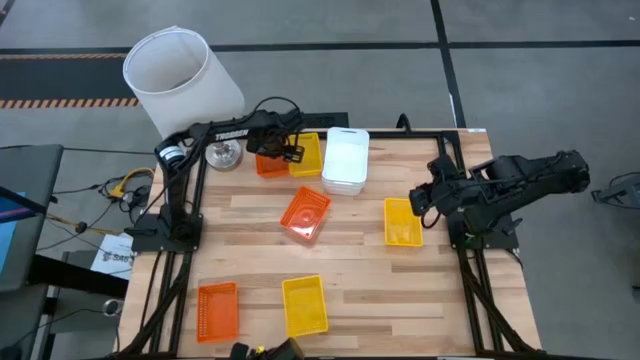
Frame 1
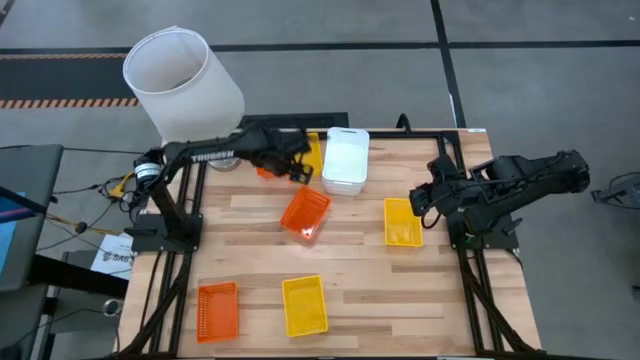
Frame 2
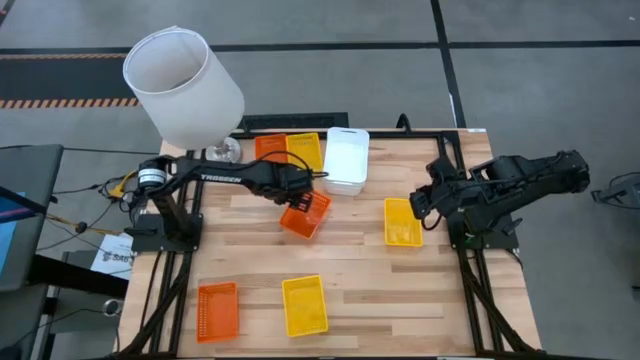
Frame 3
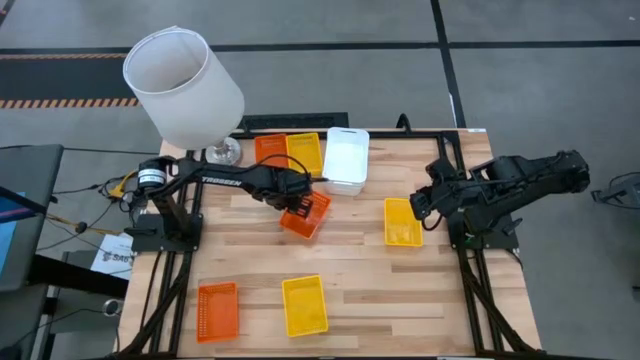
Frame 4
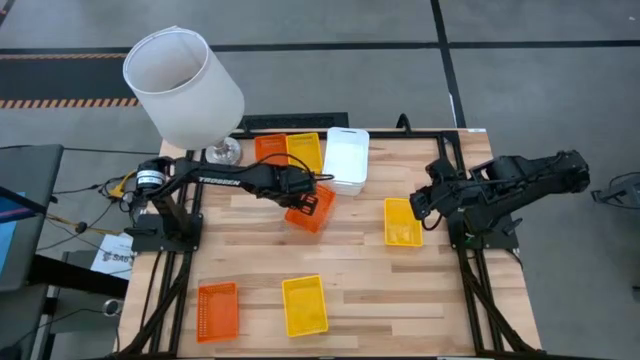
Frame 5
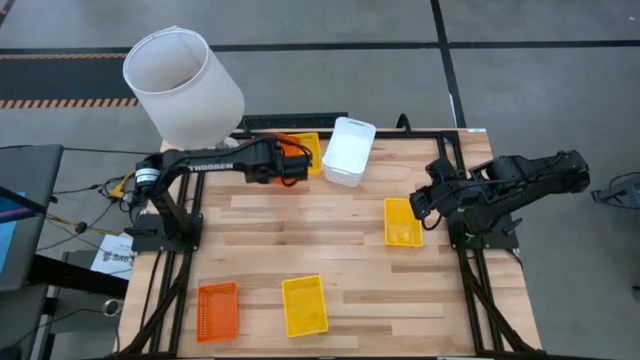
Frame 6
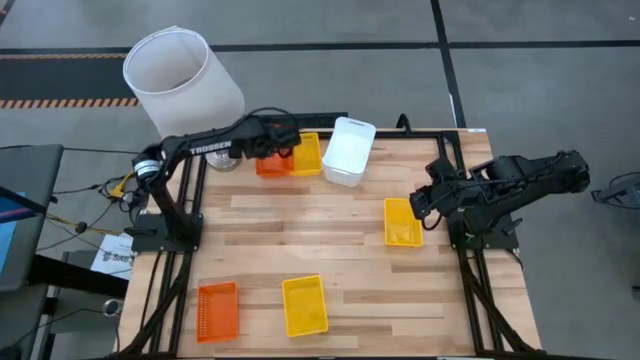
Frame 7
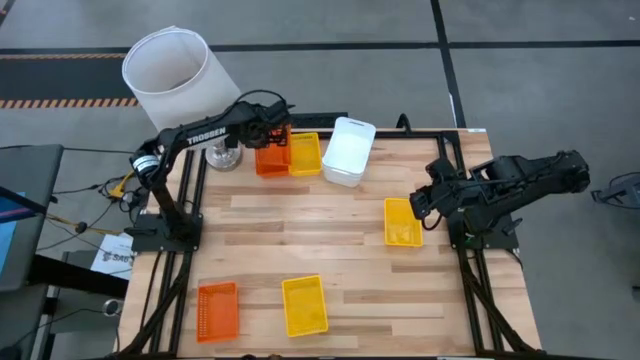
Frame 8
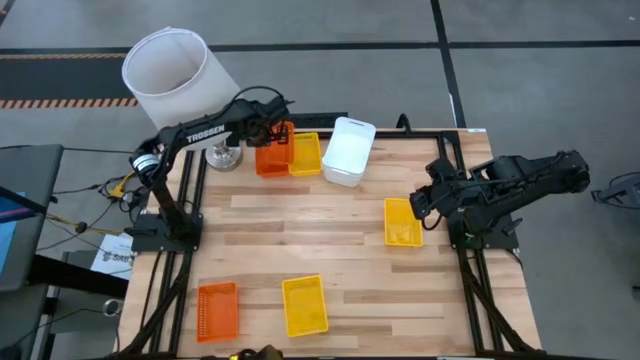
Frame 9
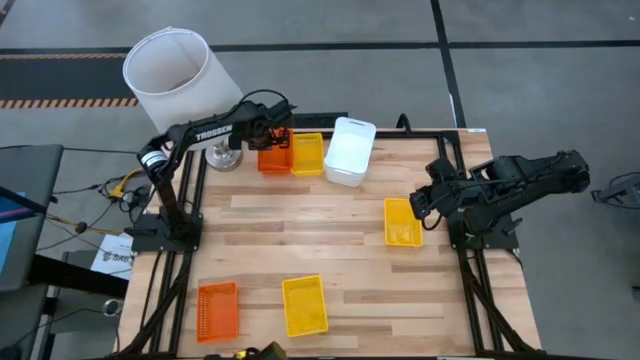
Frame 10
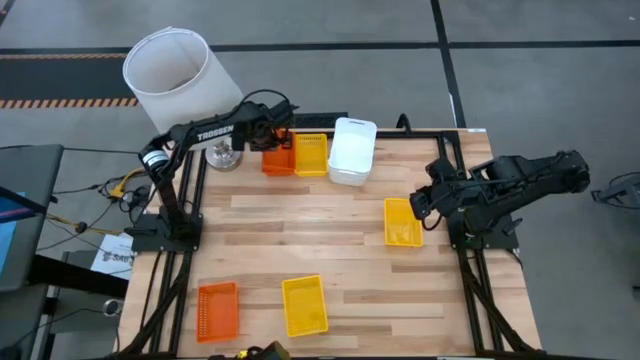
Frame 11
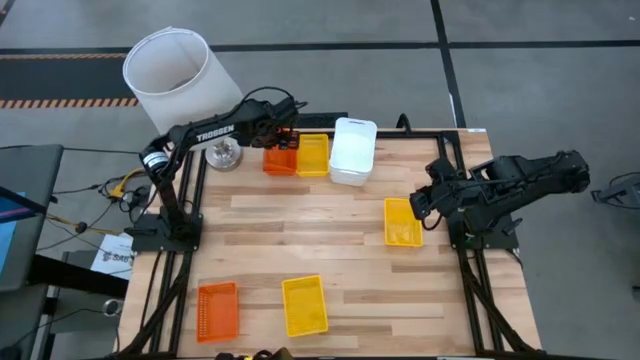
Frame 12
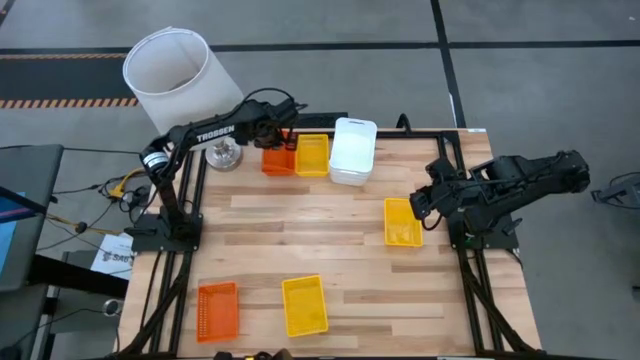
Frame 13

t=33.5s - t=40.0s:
Stack the middle orange bin on top of the top orange bin

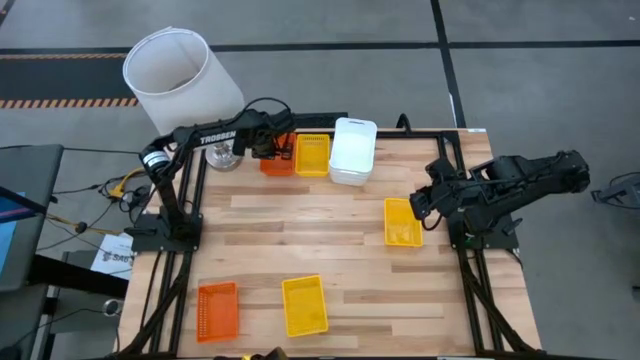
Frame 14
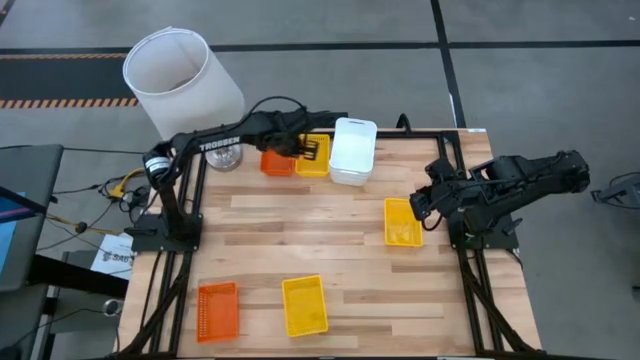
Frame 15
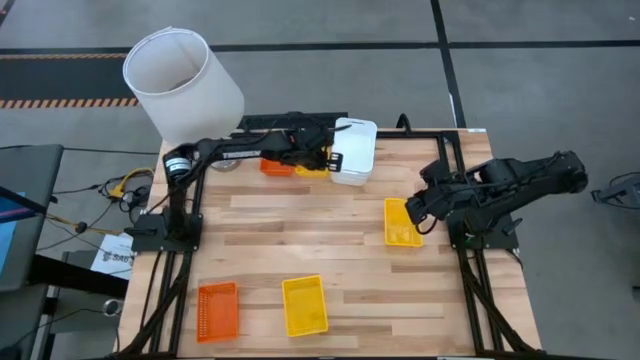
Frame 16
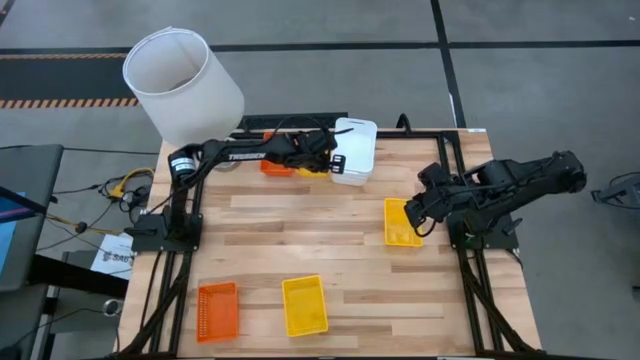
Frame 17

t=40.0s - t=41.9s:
Adjust the stacked white bins on the table

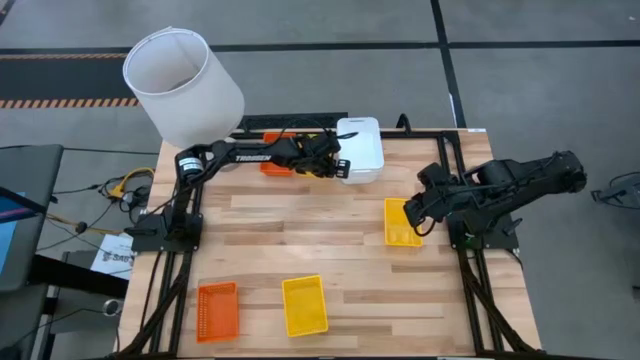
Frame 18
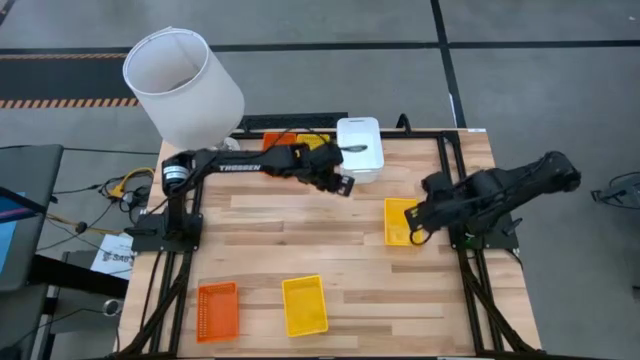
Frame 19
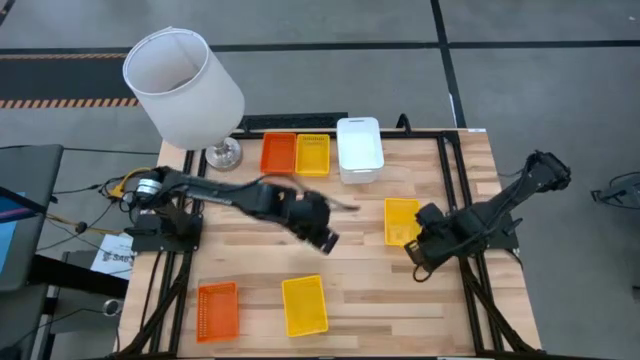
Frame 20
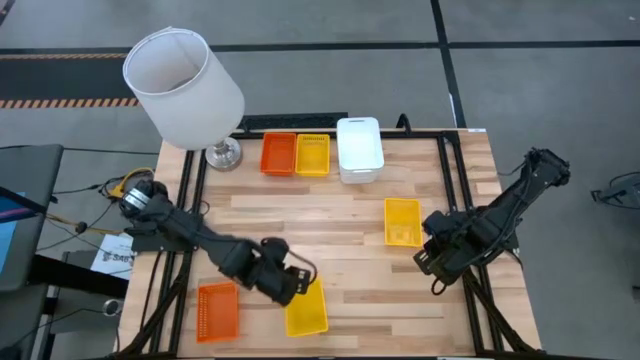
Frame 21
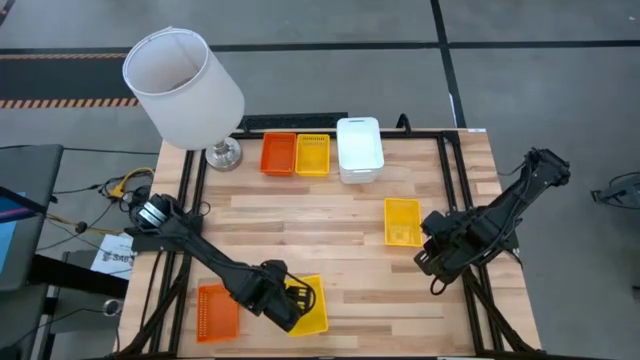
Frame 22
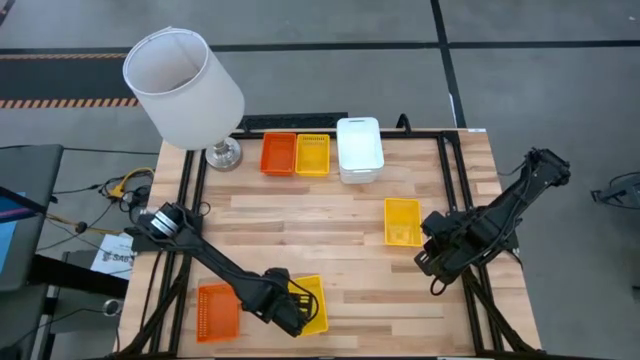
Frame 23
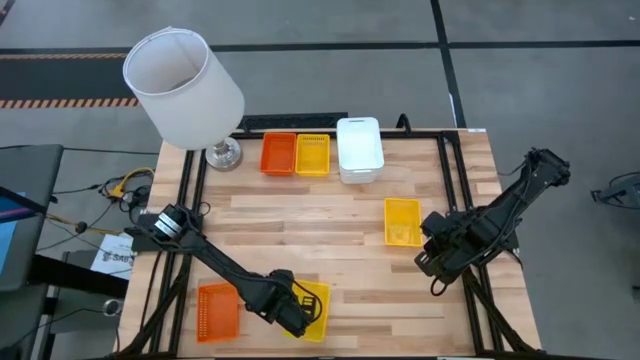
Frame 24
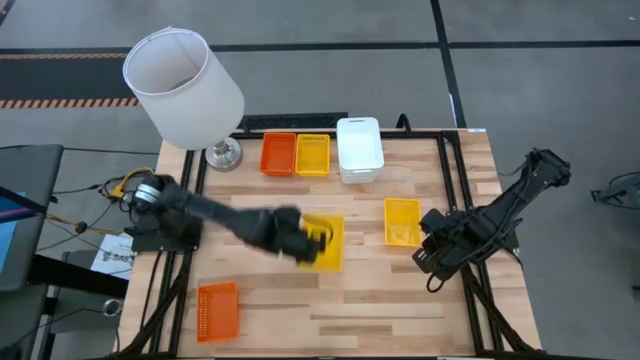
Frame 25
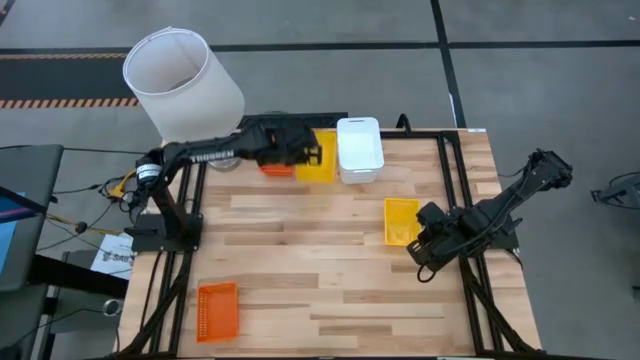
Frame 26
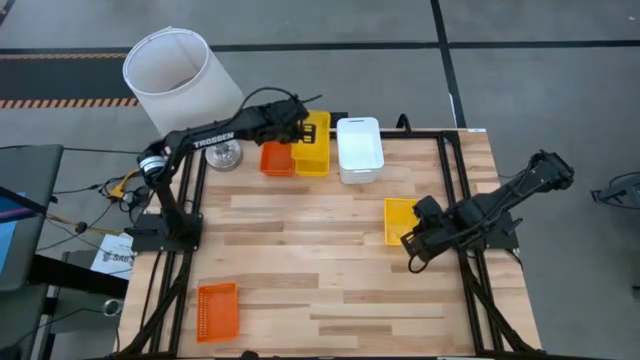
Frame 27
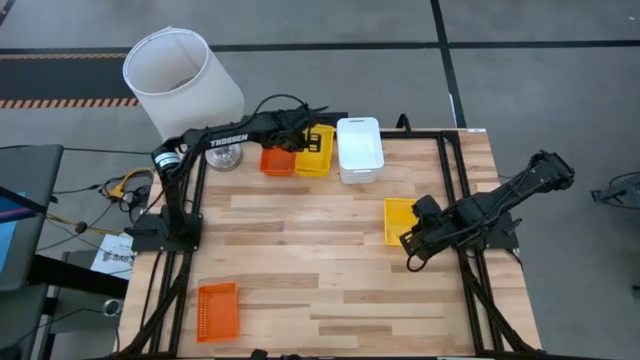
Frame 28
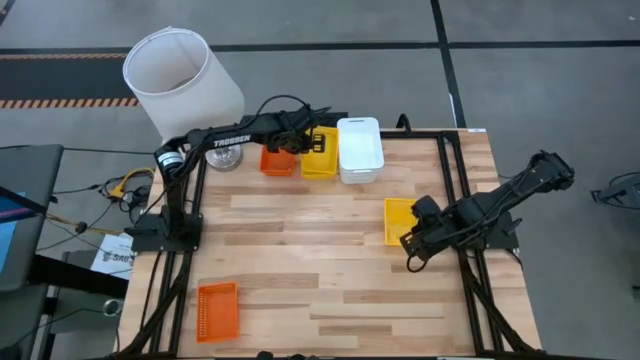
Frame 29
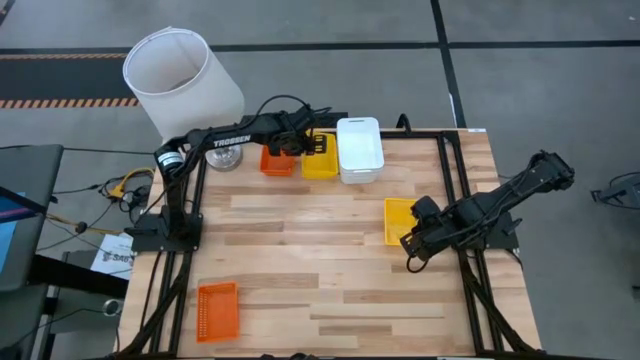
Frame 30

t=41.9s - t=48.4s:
Stack the bottom yellow bin on top of the top yellow bin

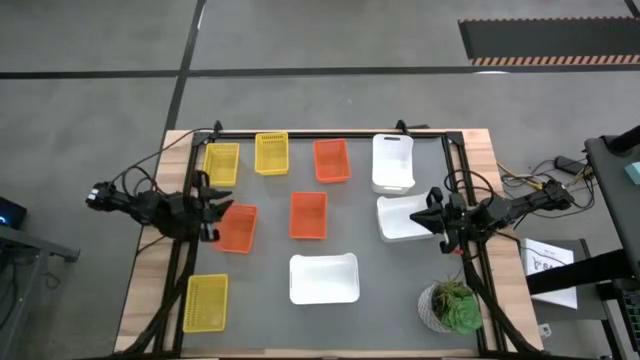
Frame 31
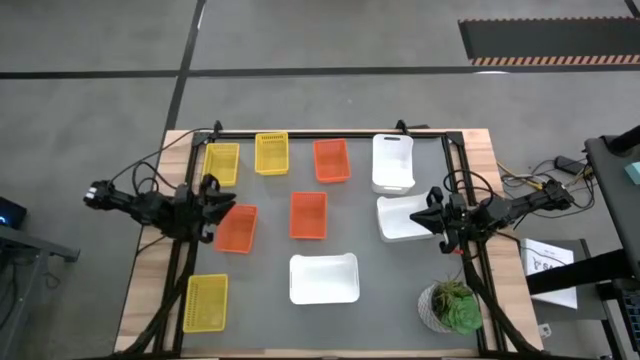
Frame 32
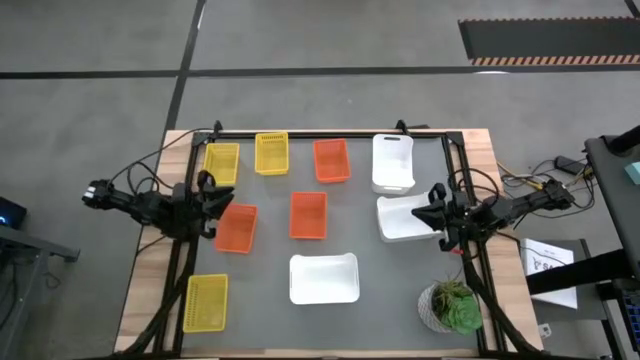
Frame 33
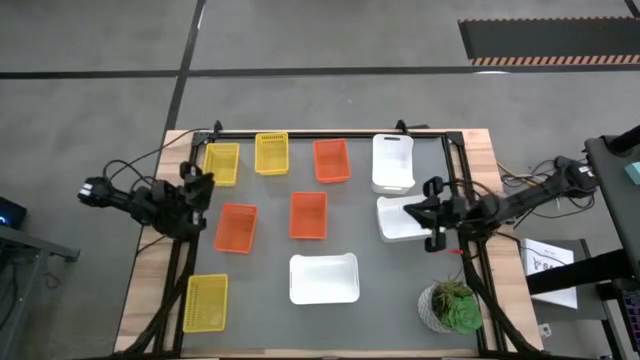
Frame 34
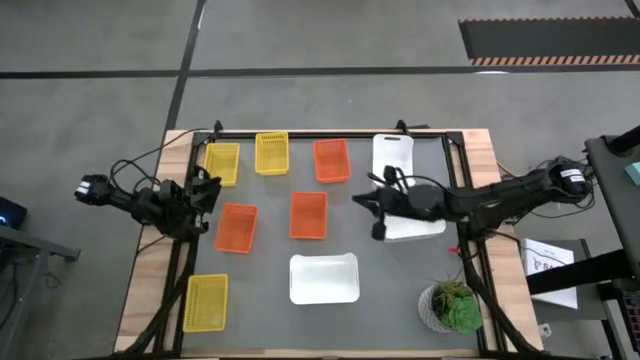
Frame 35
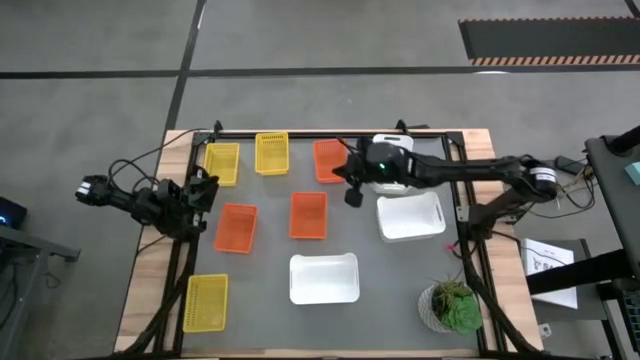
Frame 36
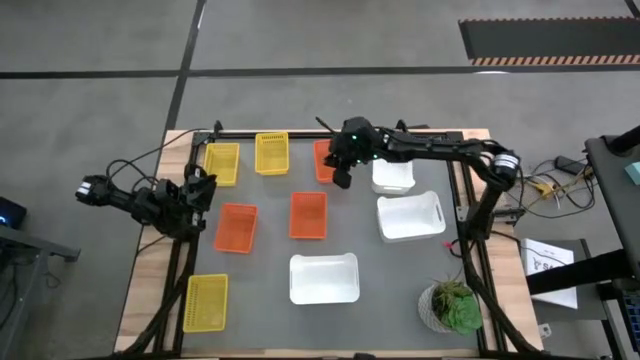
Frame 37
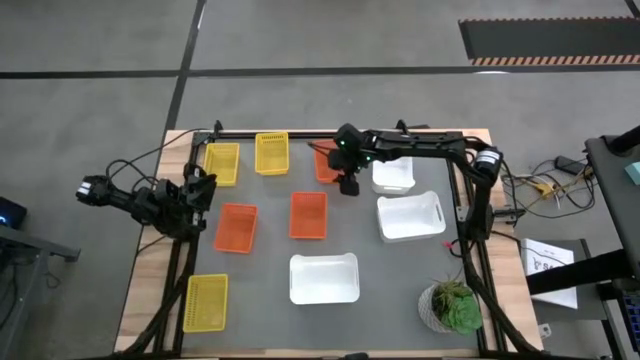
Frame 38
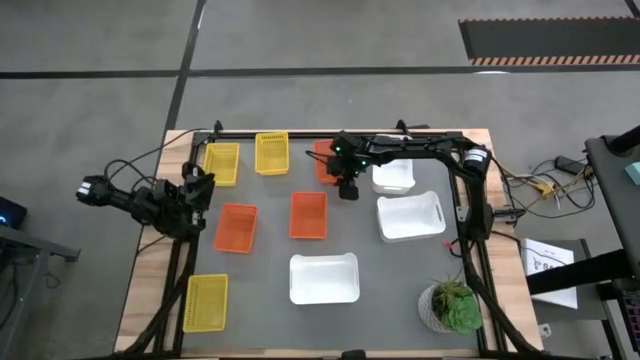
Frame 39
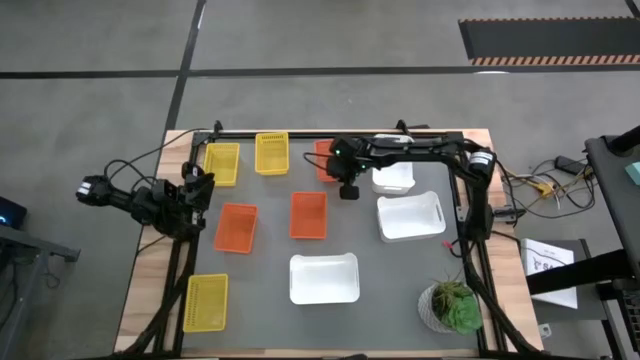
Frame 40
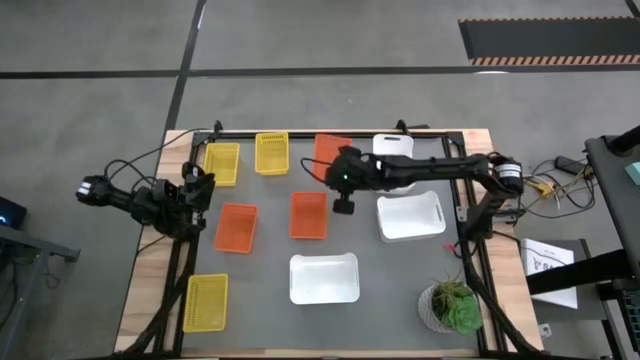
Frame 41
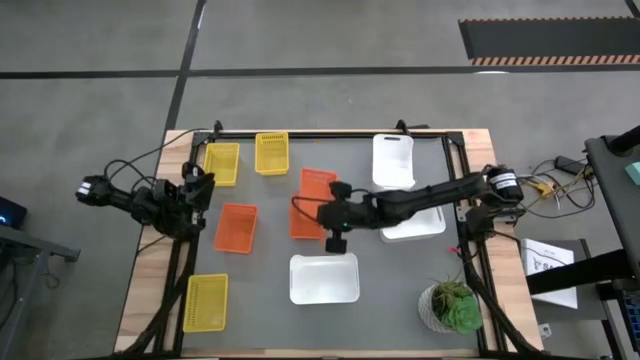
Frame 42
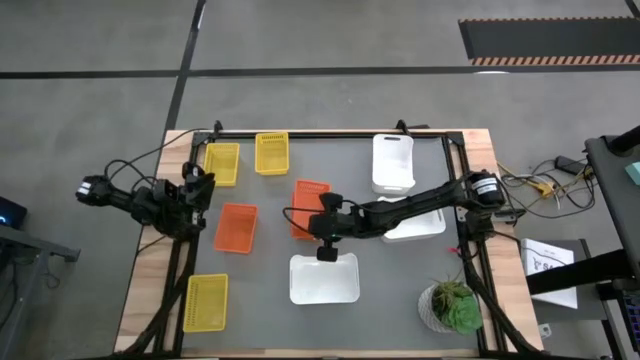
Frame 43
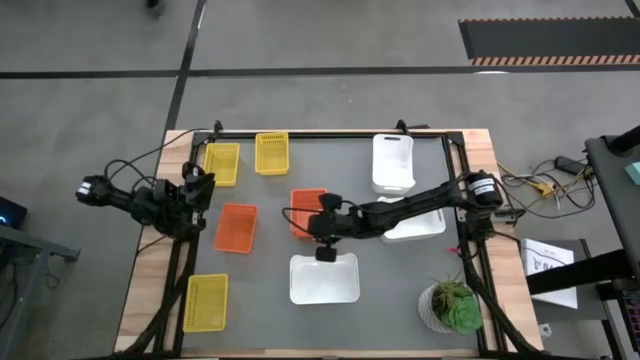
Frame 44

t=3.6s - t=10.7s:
Stack the top orange bin on top of the bottom right orange bin
